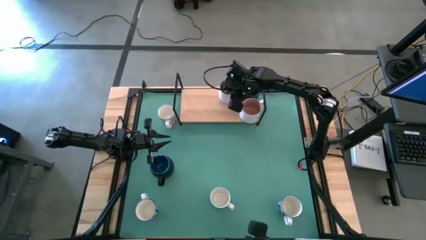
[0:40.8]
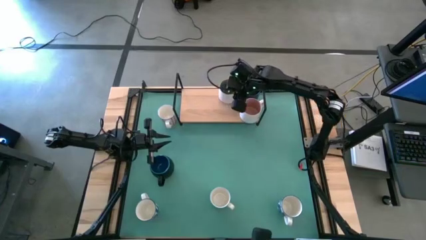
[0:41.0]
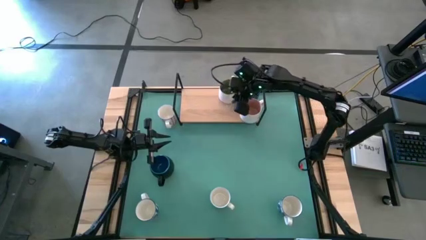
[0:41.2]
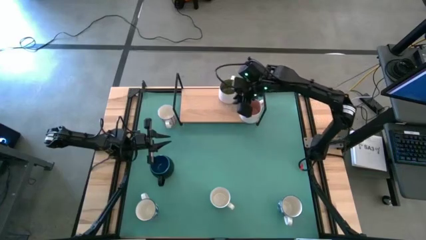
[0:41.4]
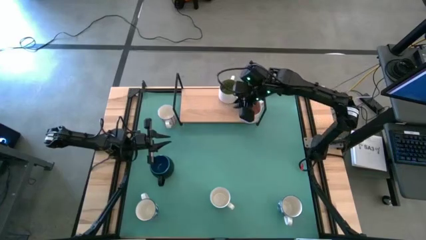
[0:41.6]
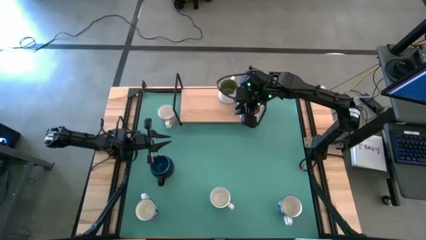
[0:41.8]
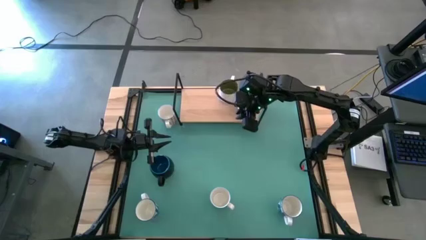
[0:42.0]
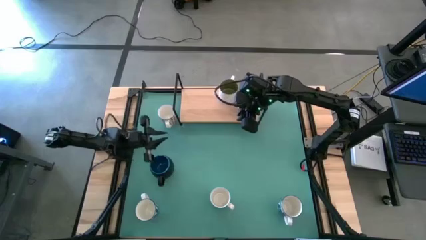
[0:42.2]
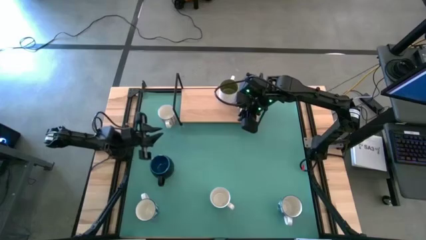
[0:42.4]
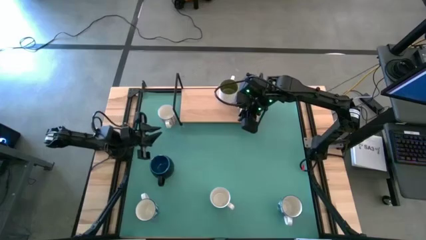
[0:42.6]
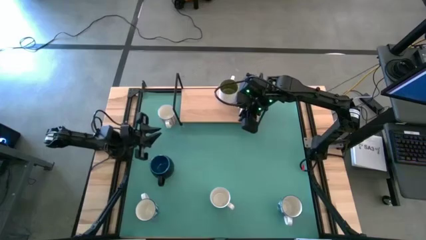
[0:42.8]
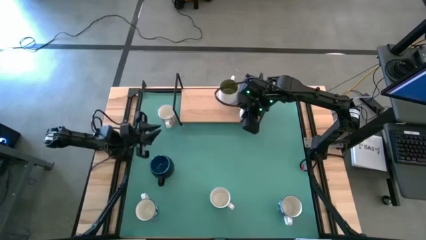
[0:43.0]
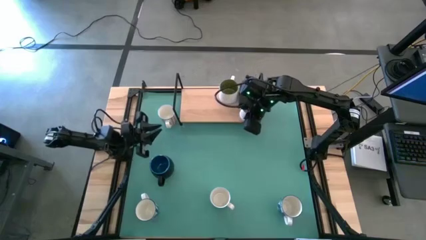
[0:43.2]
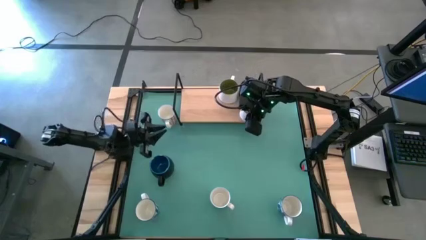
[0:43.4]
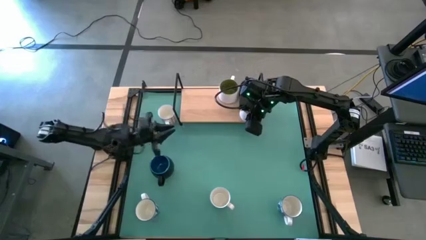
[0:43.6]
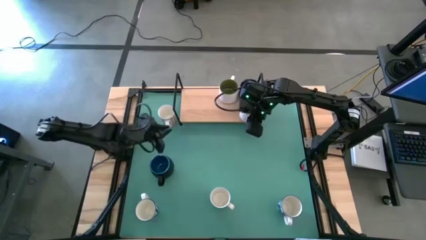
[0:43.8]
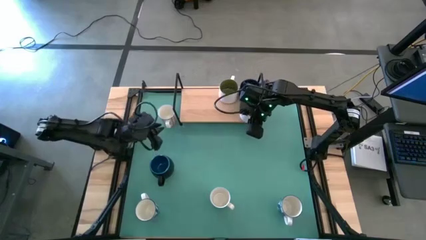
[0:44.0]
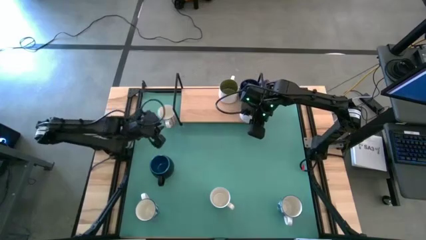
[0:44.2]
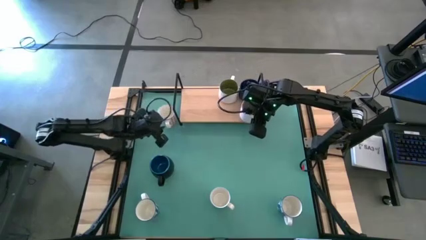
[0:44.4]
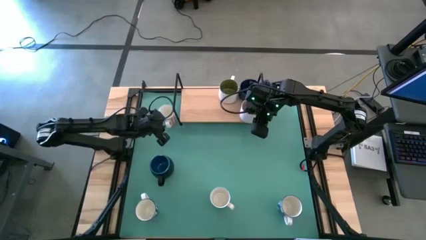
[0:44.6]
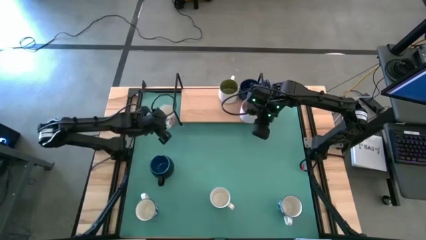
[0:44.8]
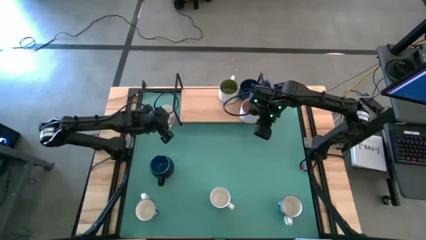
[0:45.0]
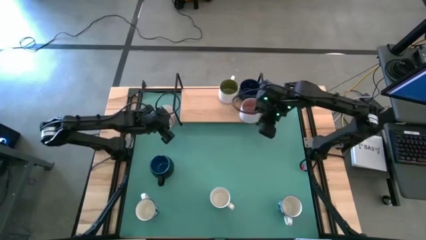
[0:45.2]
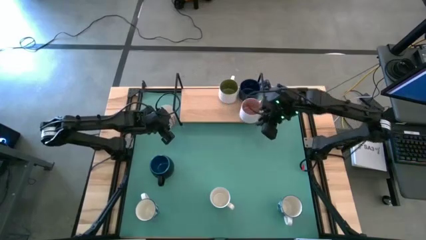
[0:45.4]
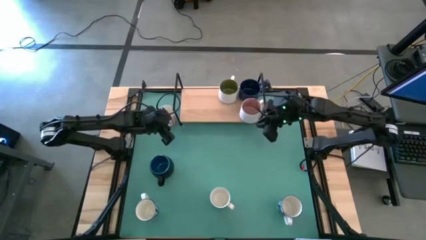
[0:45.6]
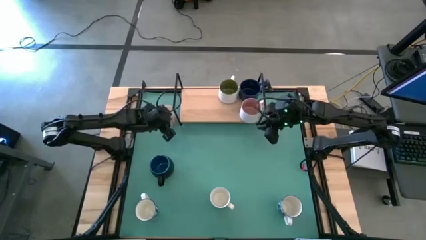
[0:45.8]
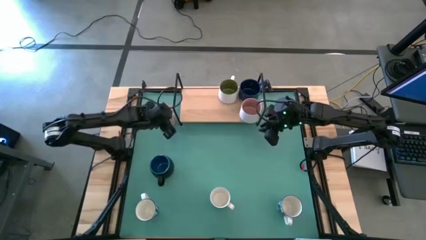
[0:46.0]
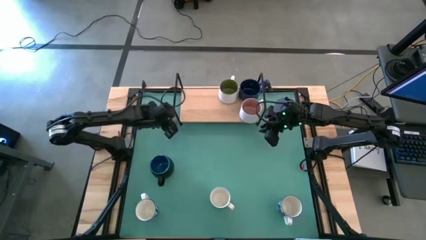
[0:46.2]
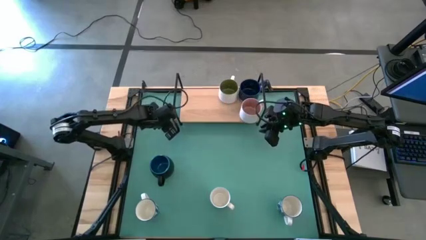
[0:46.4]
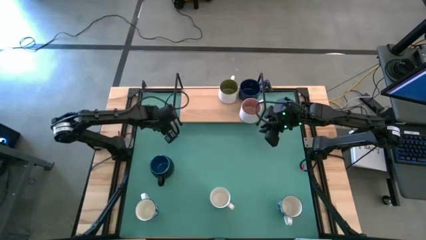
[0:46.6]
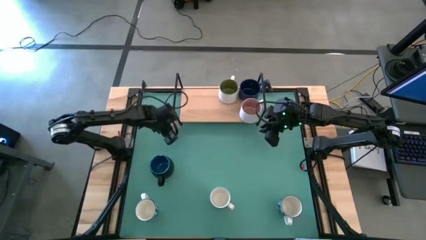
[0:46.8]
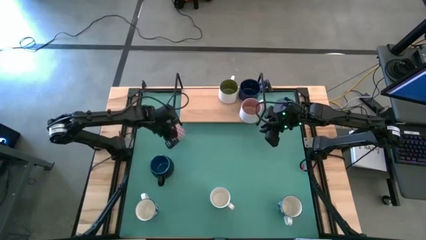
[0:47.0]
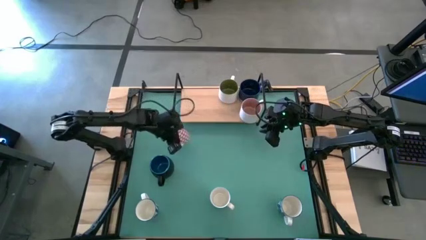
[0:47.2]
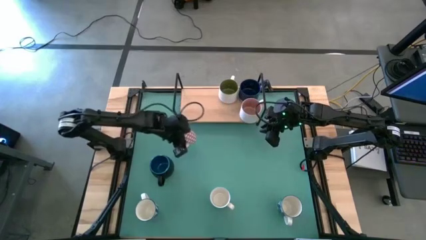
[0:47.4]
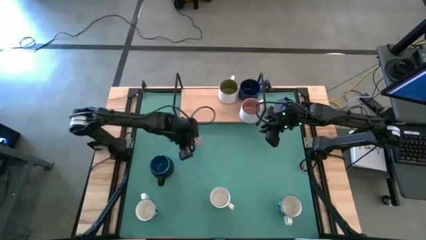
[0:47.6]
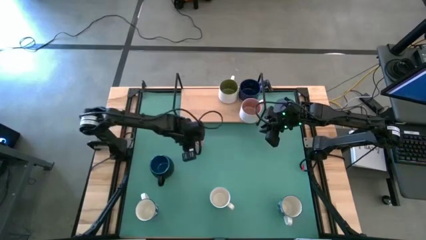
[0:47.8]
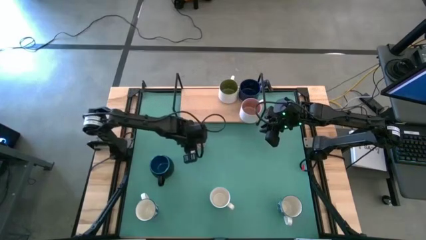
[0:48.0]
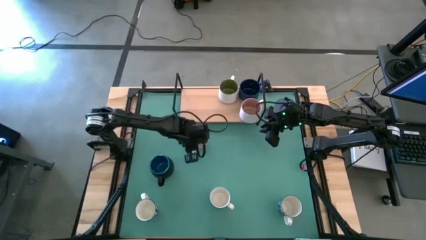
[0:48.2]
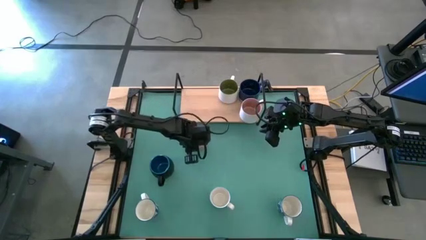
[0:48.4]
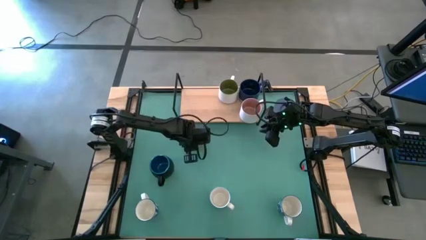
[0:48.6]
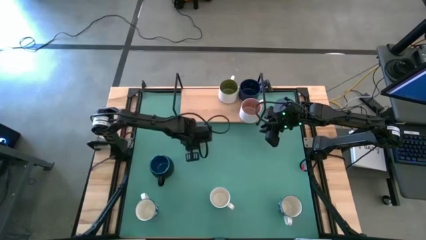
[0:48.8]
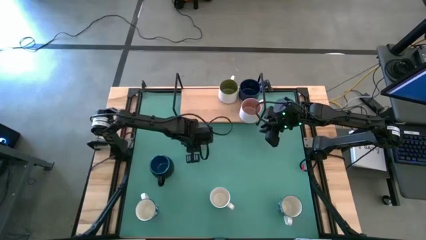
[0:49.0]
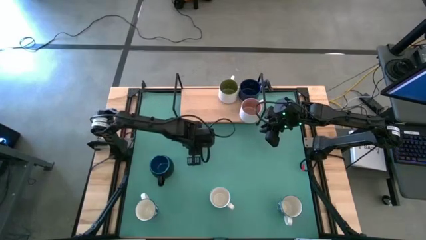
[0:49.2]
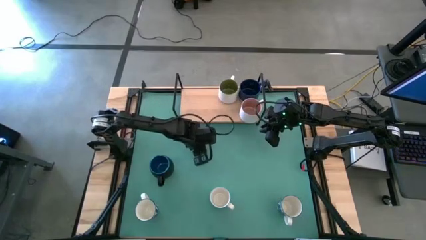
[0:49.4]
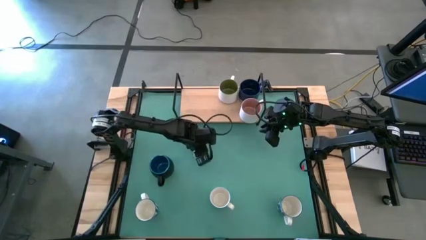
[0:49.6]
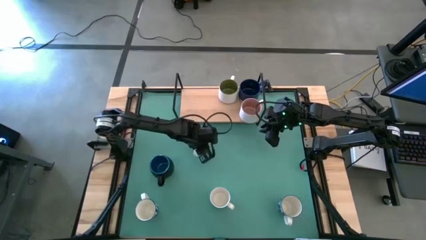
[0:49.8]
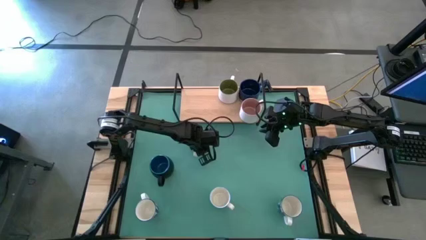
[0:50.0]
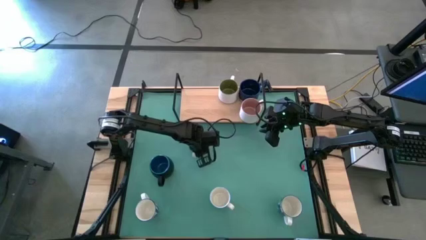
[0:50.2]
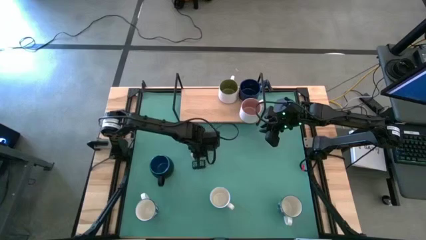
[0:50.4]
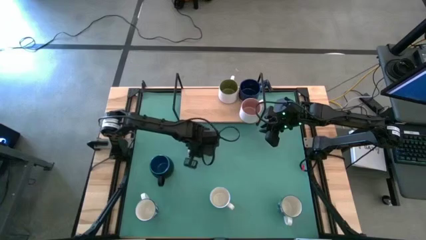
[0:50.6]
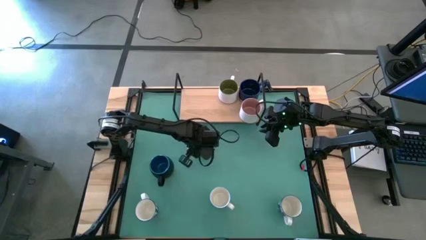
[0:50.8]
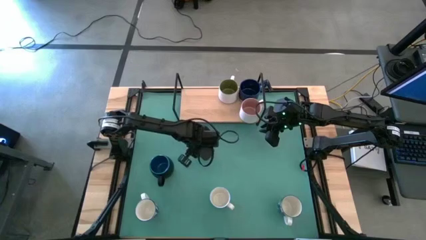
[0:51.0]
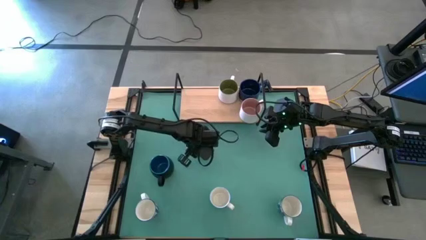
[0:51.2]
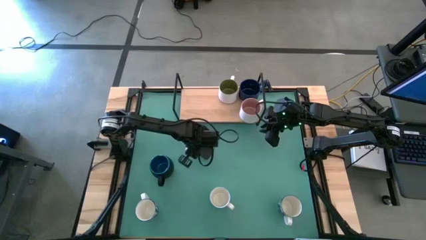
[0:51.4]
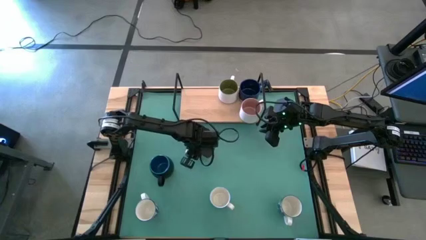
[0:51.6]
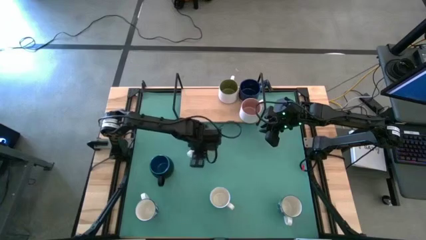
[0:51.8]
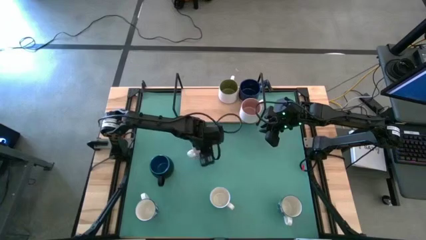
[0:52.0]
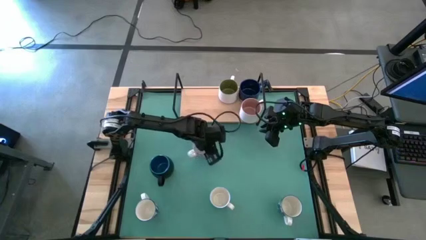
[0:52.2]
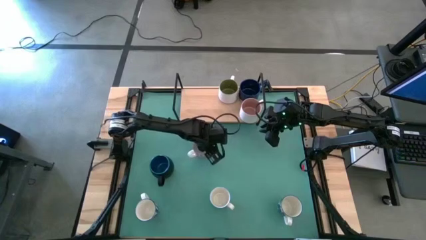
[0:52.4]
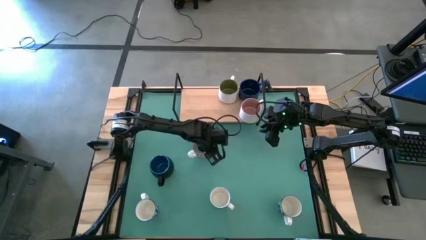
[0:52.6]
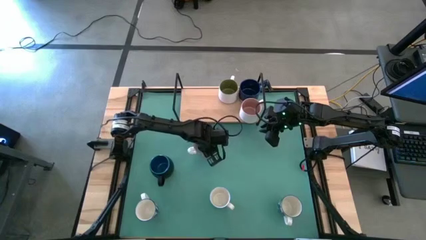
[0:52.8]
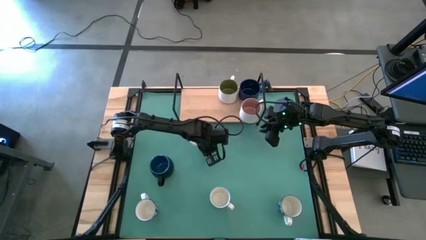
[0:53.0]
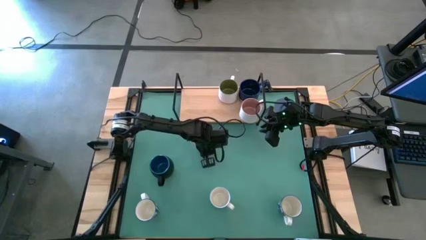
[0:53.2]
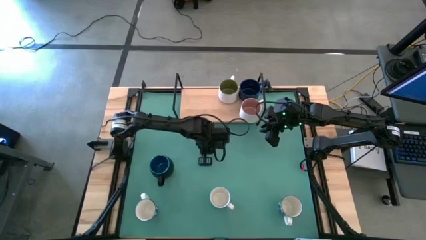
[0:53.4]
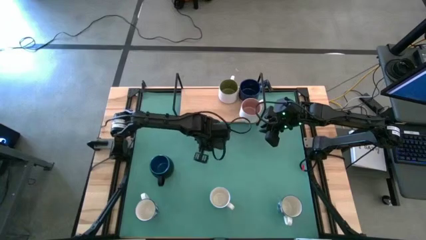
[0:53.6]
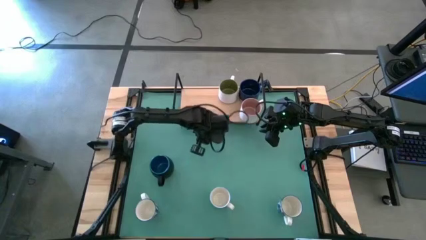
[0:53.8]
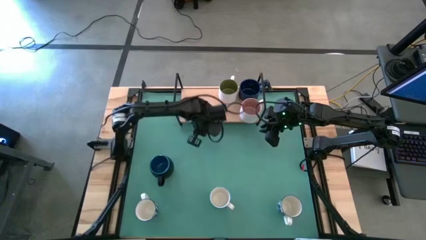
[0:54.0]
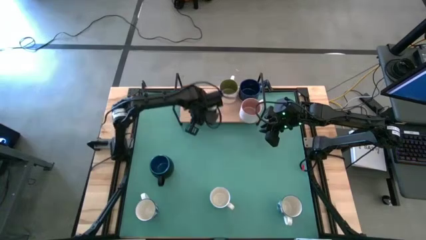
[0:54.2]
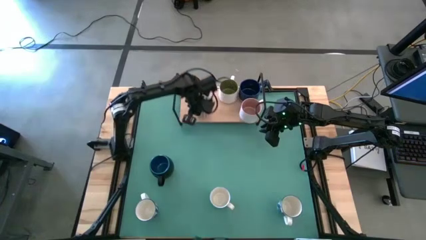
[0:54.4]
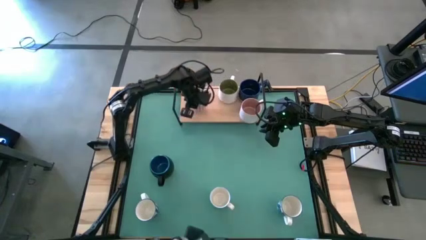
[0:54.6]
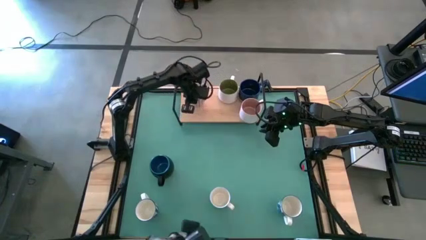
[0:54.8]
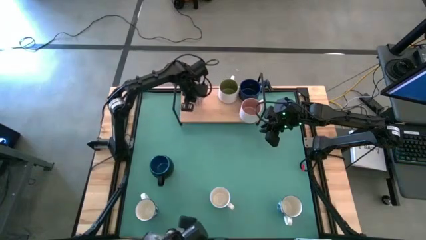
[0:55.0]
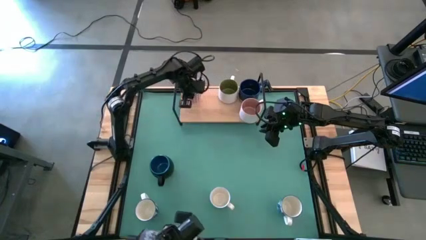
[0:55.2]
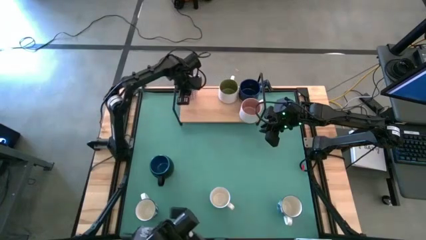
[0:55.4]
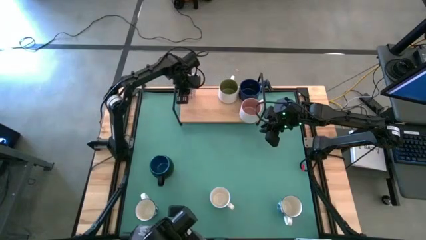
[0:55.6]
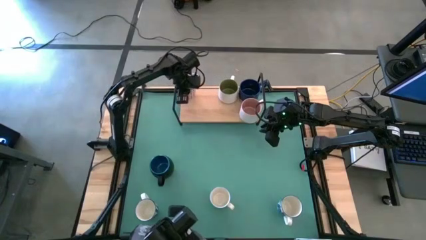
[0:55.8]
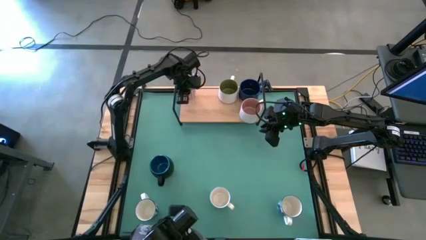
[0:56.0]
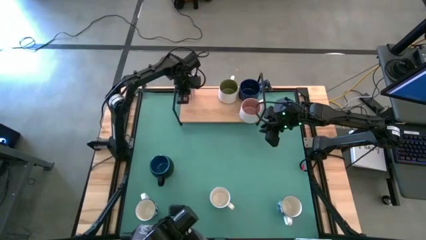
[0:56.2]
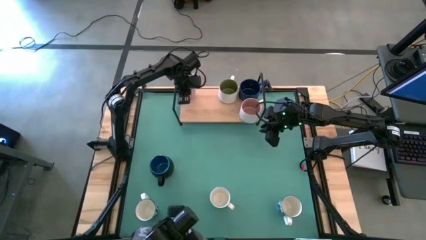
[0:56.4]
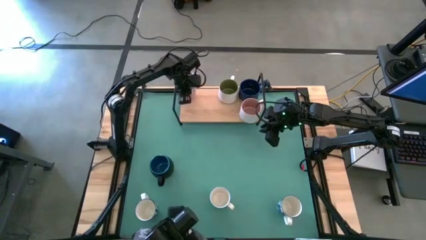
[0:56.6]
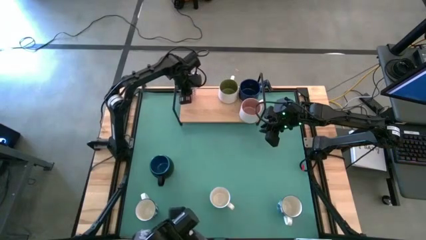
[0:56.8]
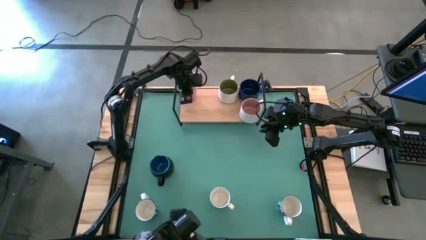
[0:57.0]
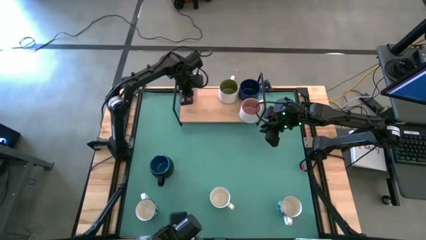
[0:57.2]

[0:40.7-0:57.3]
Task: Place coffee mugs
Put the red pattern mug on the shelf
